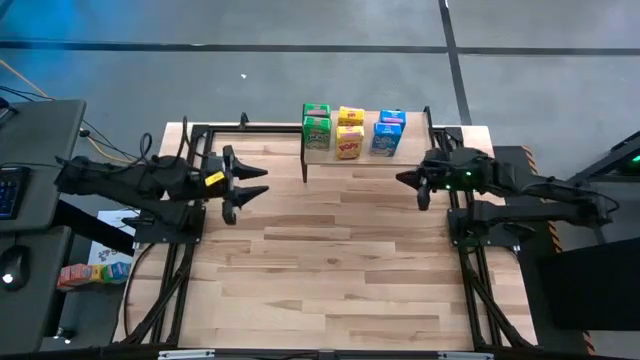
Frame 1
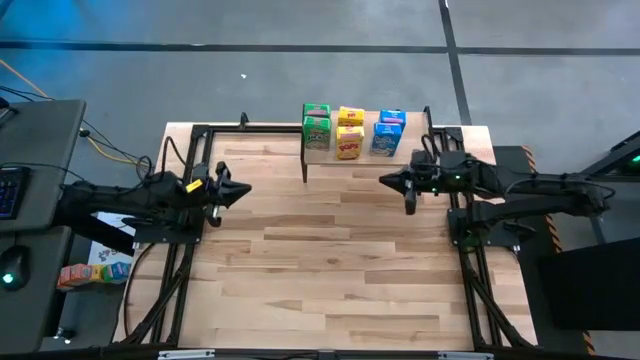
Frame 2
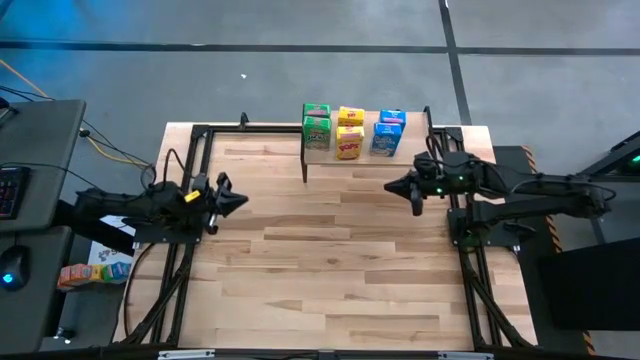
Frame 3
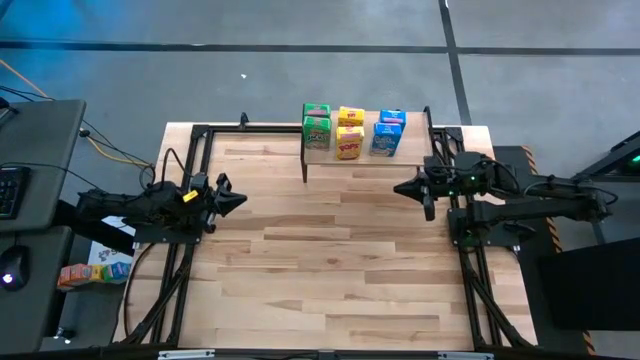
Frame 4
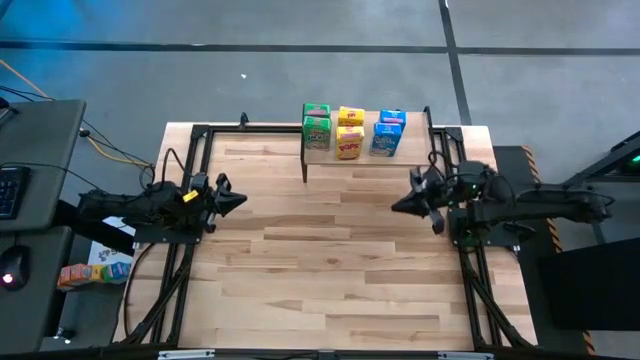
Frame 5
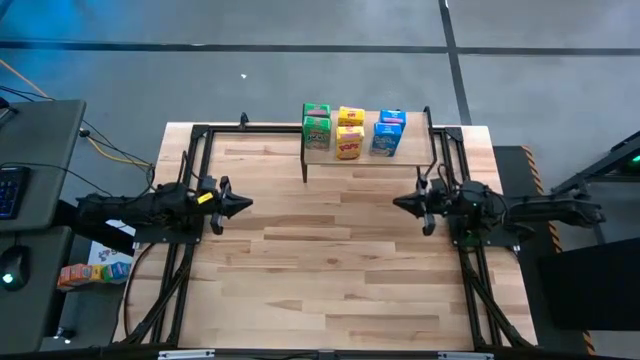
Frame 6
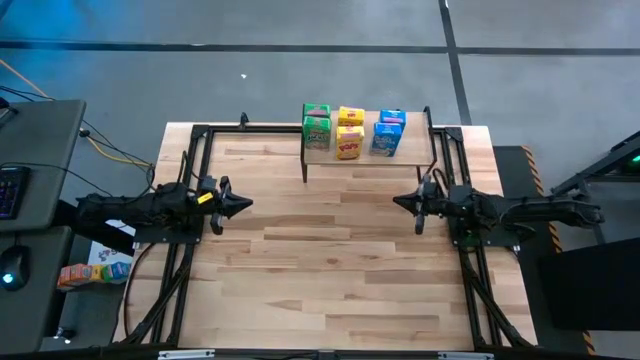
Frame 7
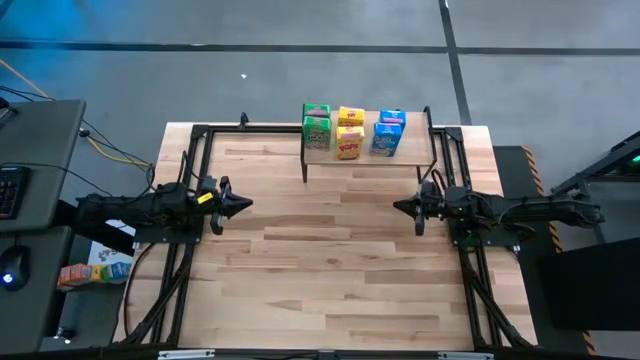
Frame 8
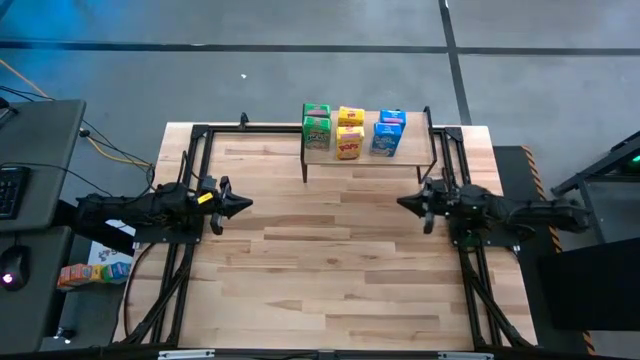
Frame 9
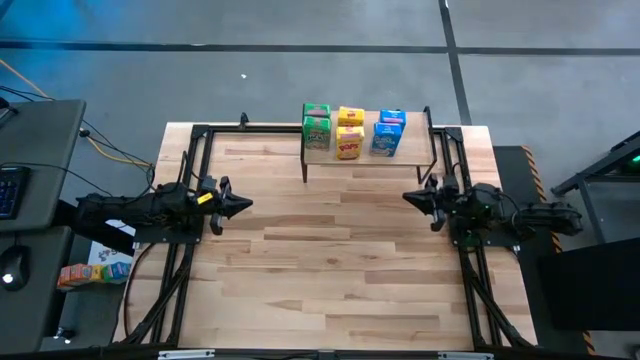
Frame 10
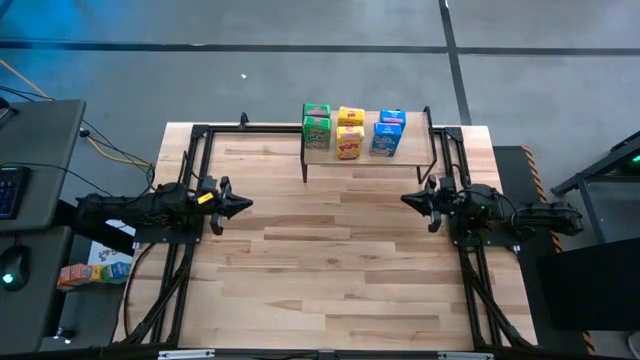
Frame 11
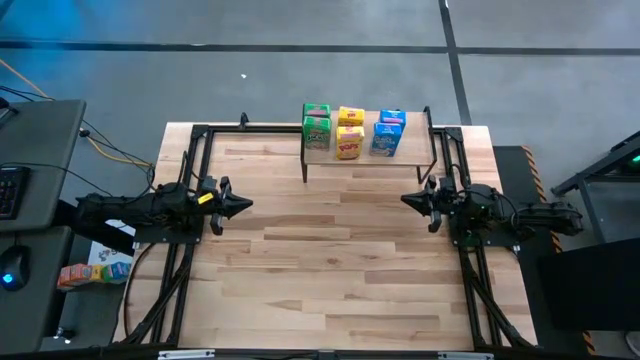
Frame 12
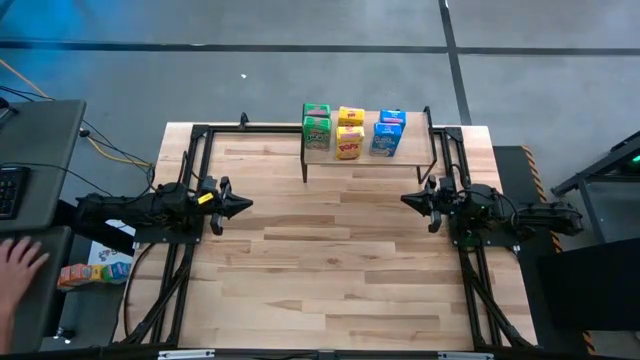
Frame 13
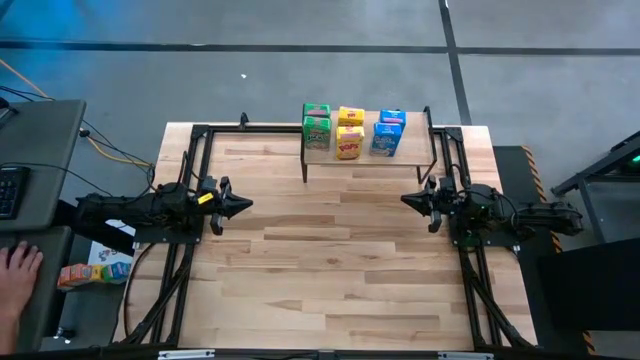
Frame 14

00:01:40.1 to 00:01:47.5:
Task: Stack cereal on shelf
Return to Home Position

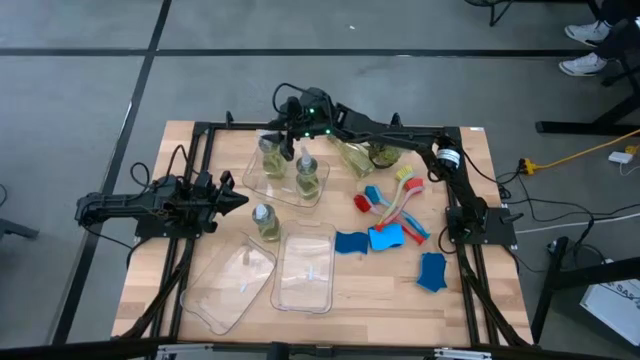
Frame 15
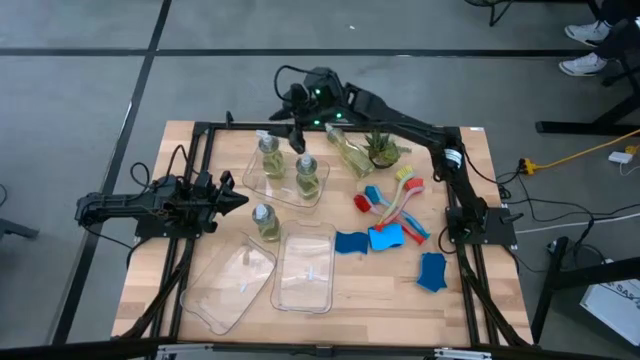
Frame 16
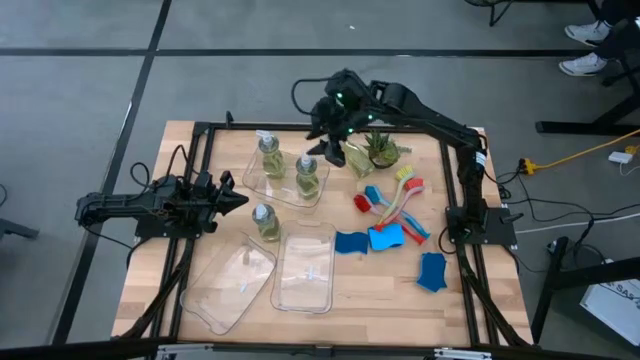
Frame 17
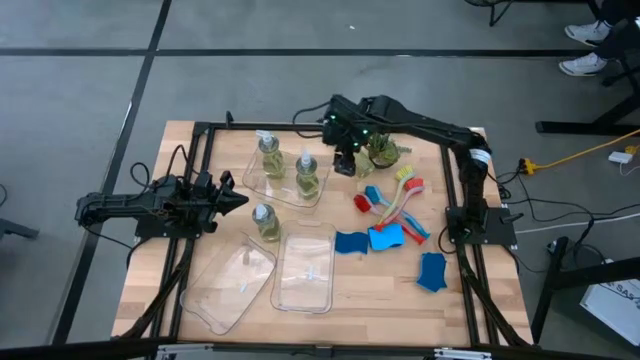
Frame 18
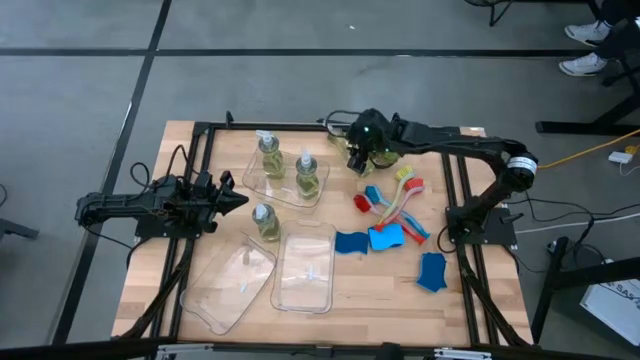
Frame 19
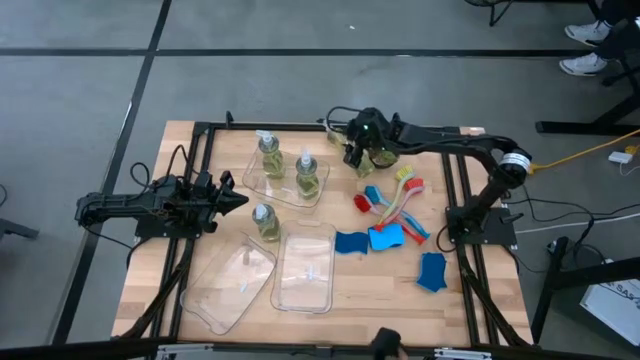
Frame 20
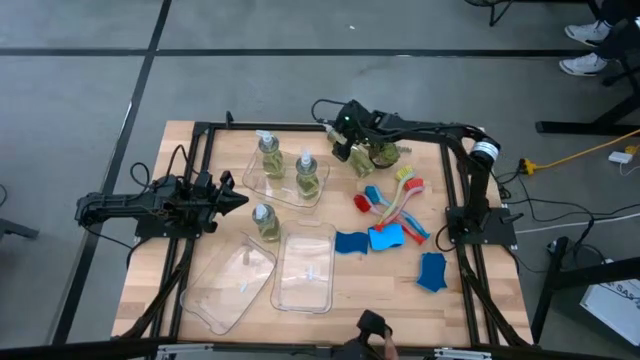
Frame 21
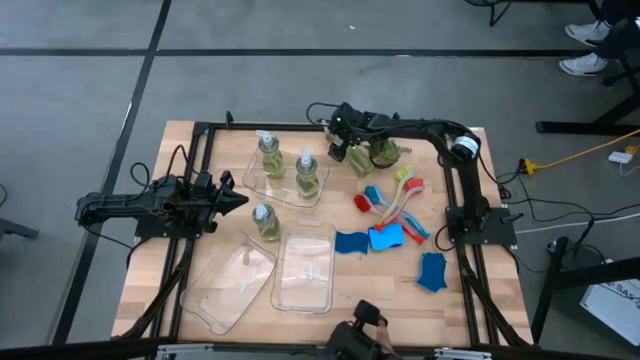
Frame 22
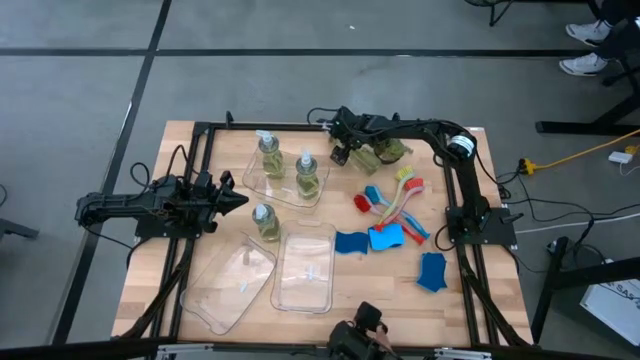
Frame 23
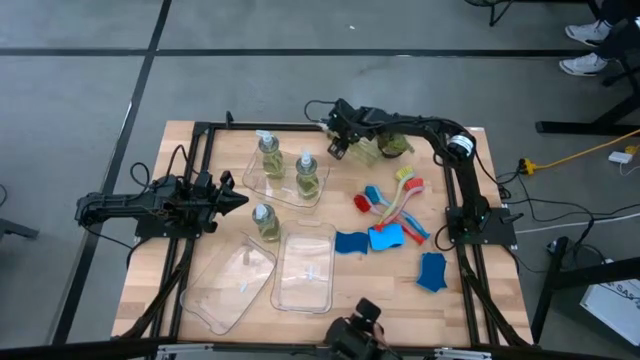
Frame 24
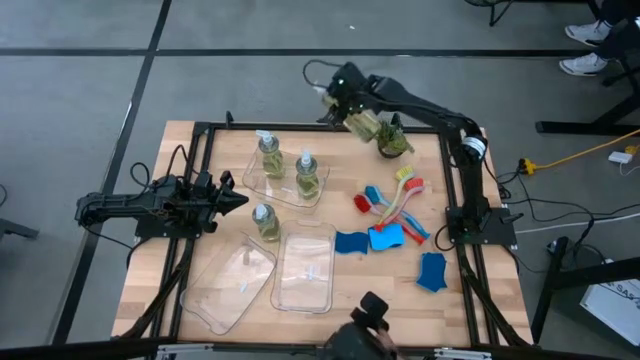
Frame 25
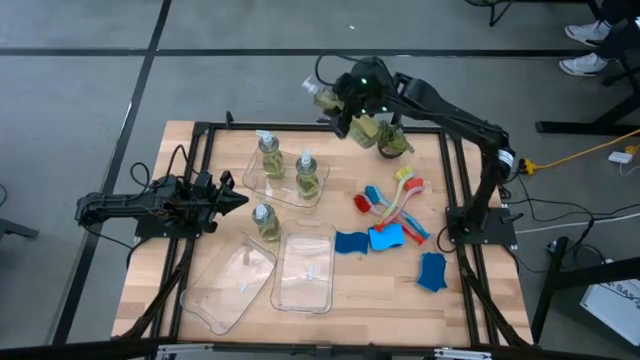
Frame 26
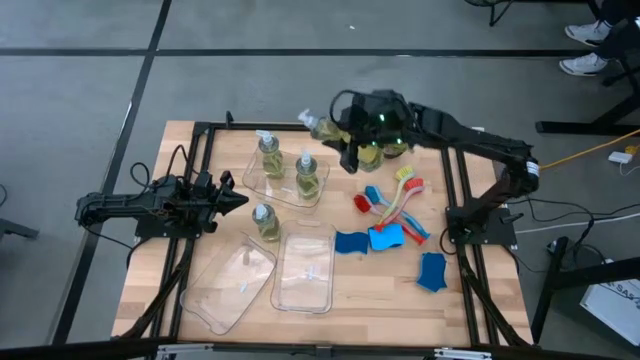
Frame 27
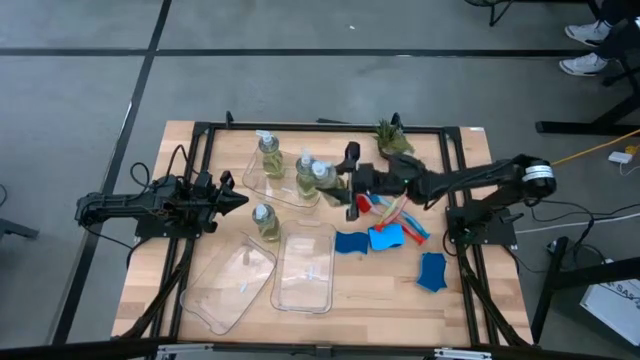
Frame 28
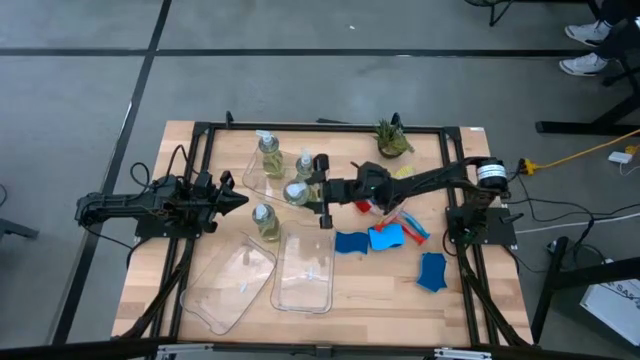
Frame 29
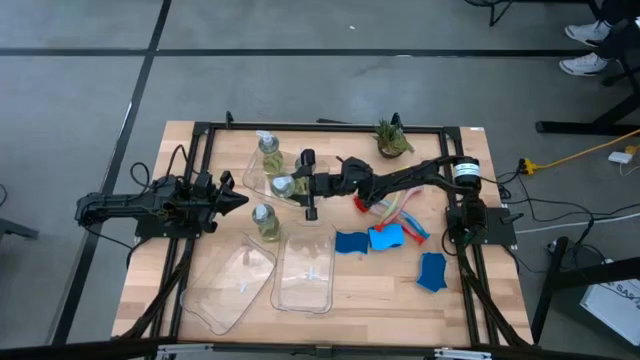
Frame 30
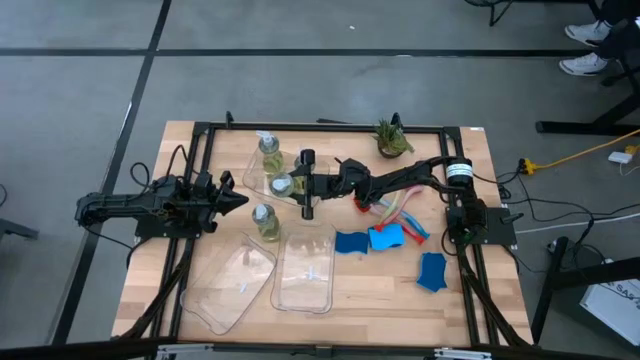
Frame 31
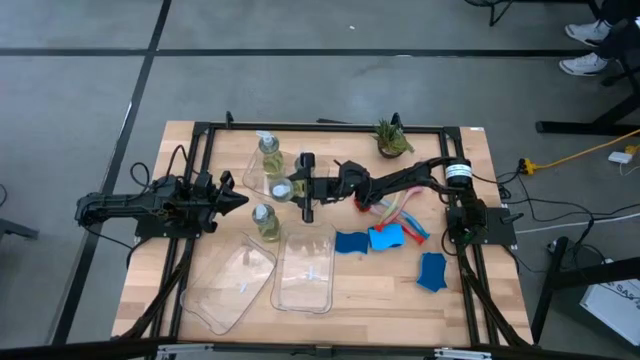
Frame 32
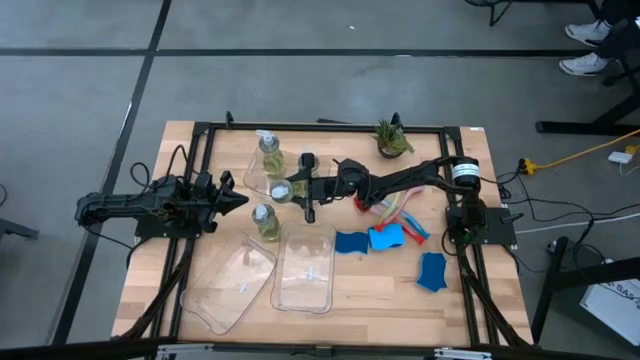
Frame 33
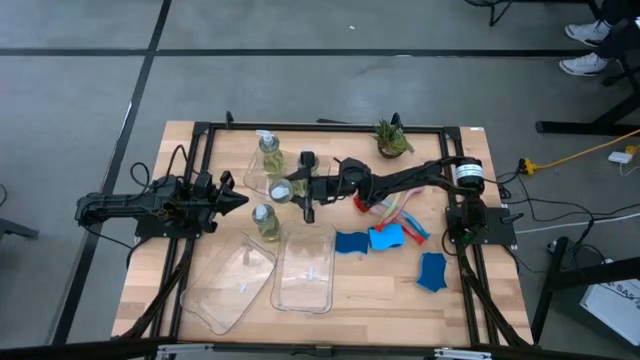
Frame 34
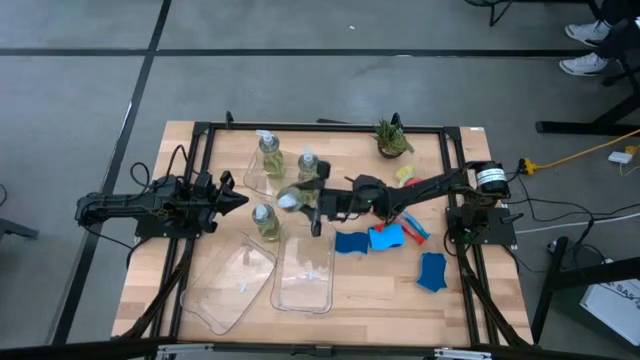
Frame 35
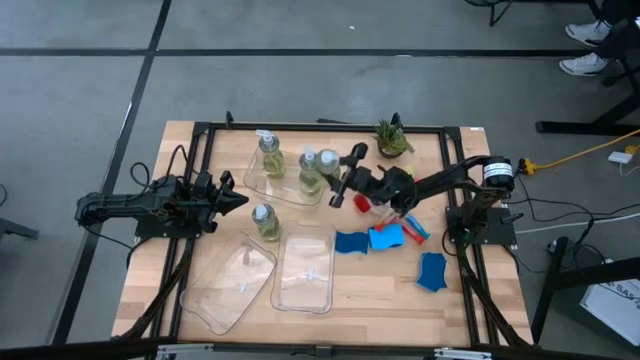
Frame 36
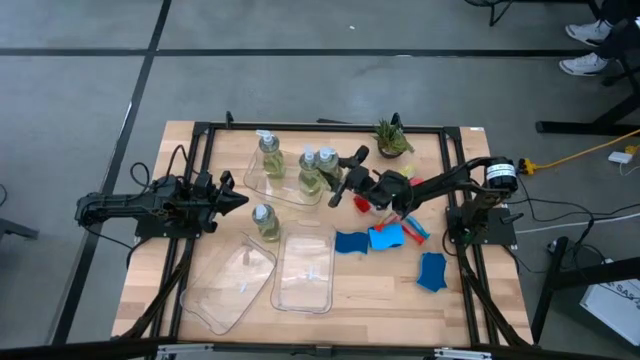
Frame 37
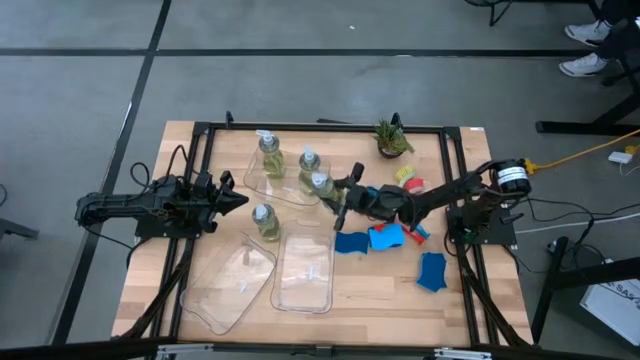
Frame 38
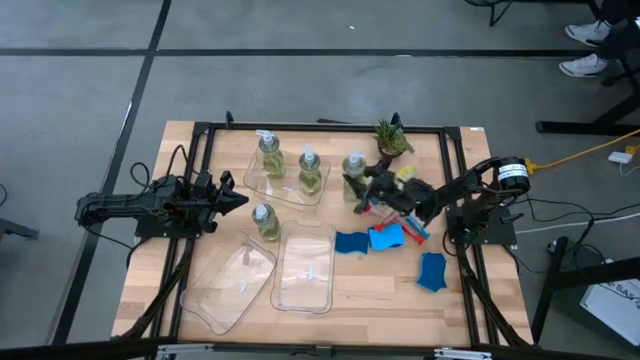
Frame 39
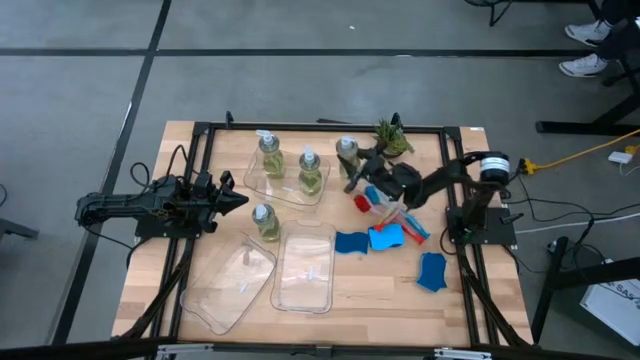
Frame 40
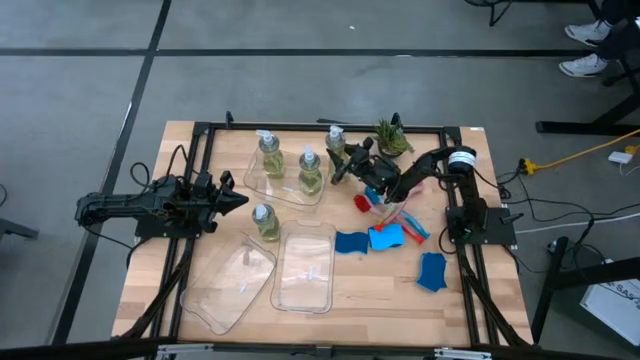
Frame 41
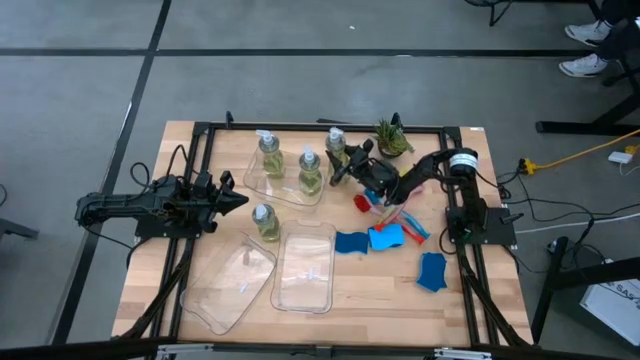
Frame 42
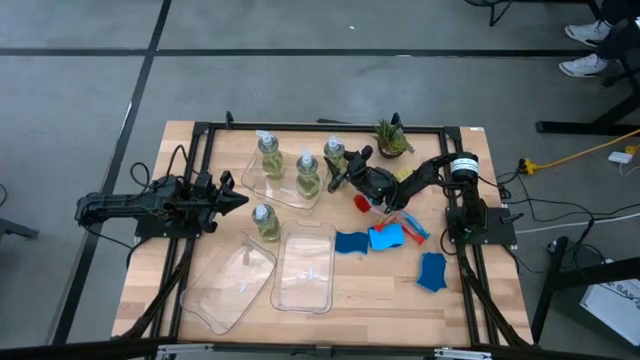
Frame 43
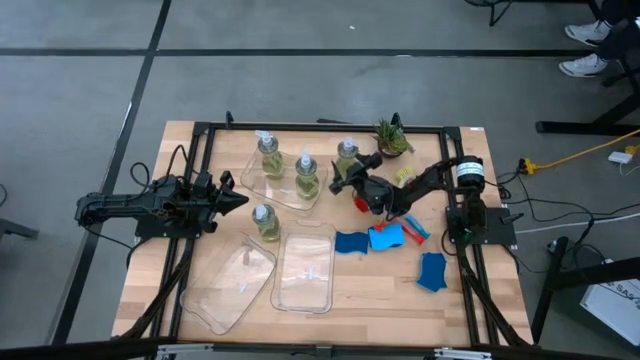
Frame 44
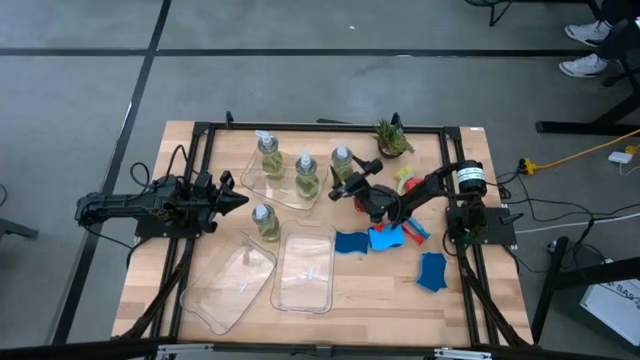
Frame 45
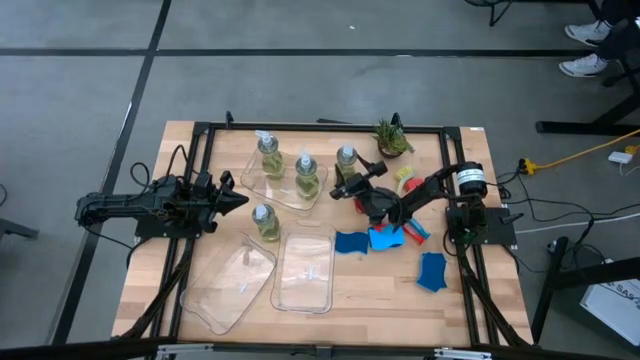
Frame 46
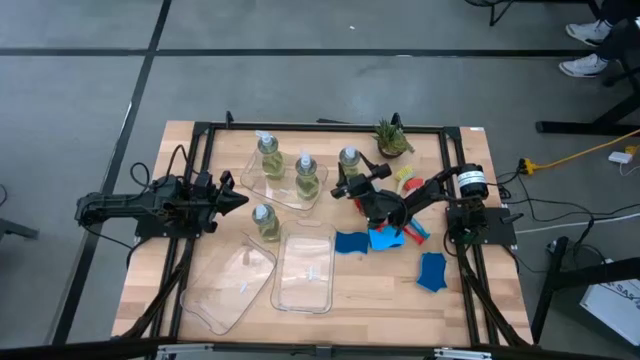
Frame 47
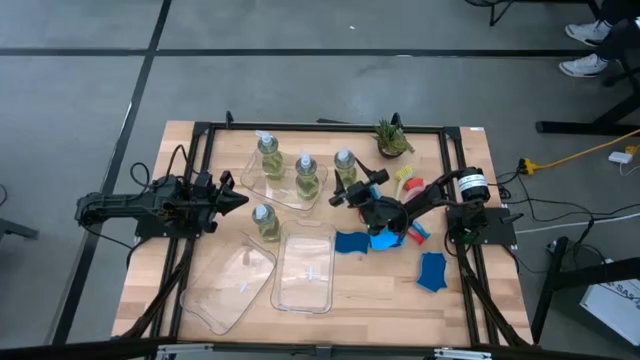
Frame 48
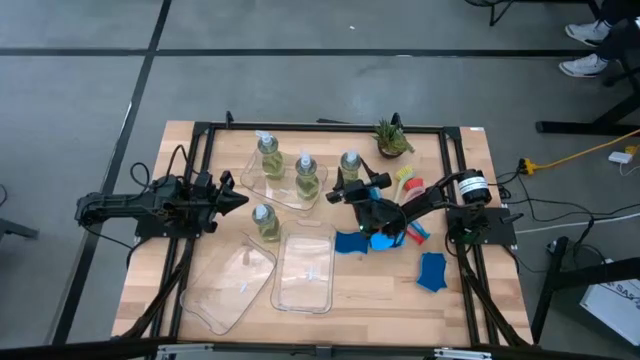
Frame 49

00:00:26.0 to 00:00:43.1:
Task: Pick & Place Kitchen Sink Supplies
Put the green soap dispenser into the top transparent bin
